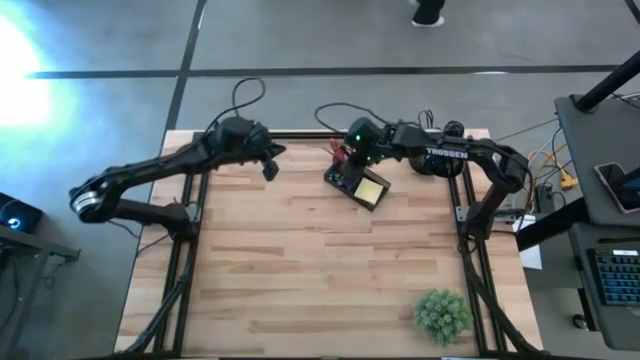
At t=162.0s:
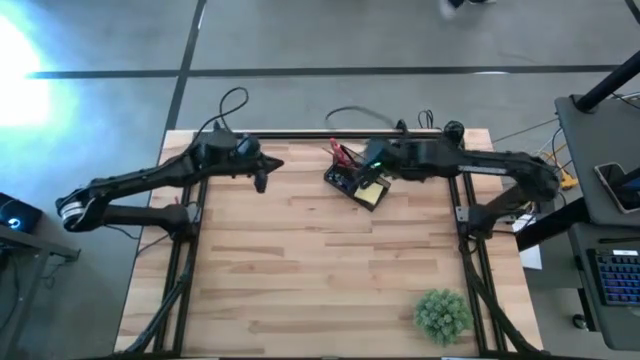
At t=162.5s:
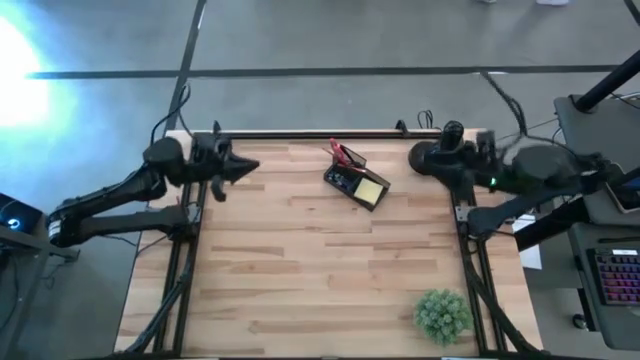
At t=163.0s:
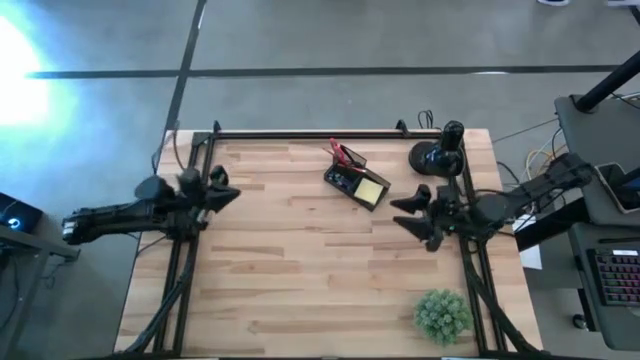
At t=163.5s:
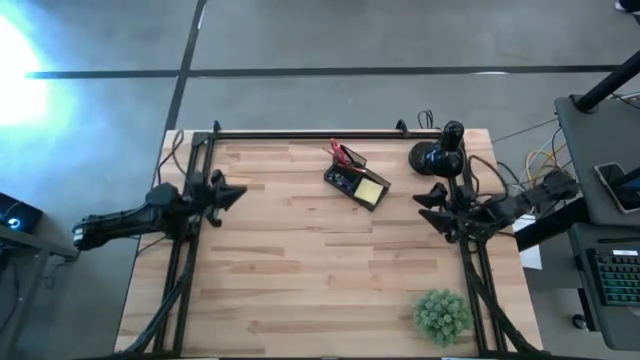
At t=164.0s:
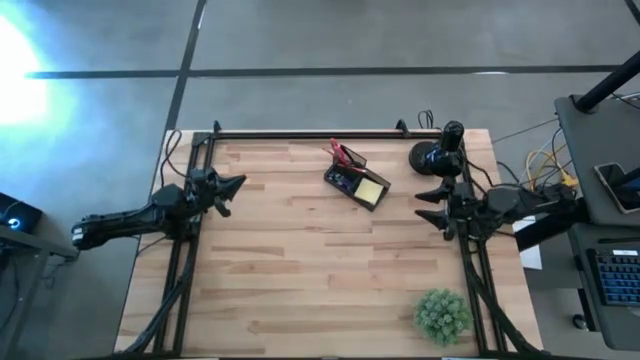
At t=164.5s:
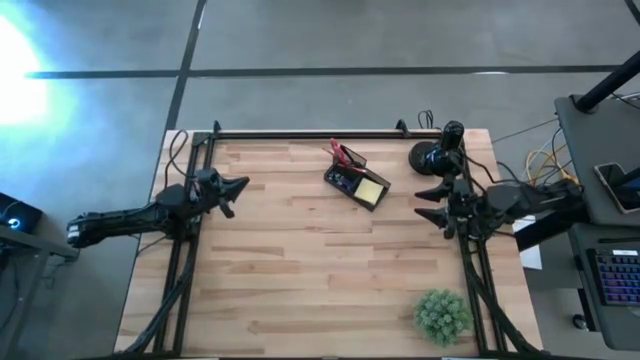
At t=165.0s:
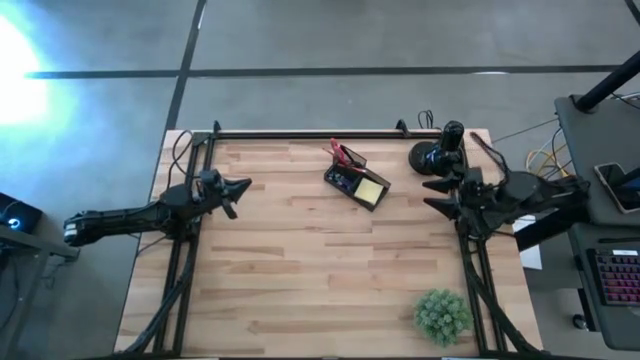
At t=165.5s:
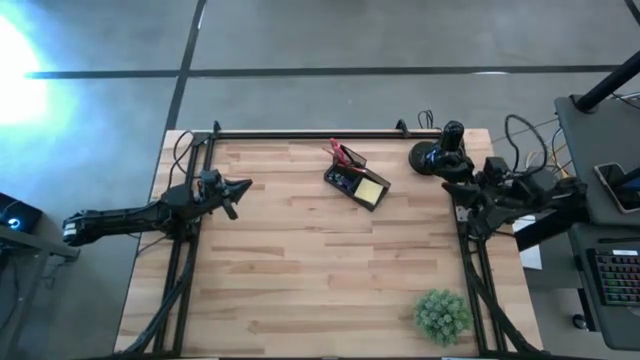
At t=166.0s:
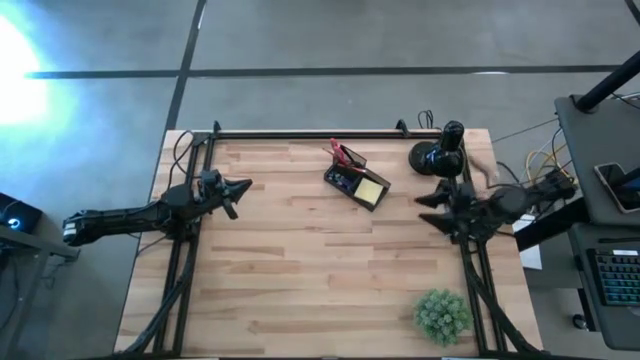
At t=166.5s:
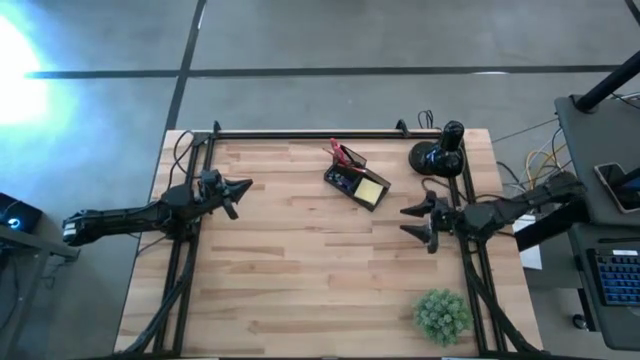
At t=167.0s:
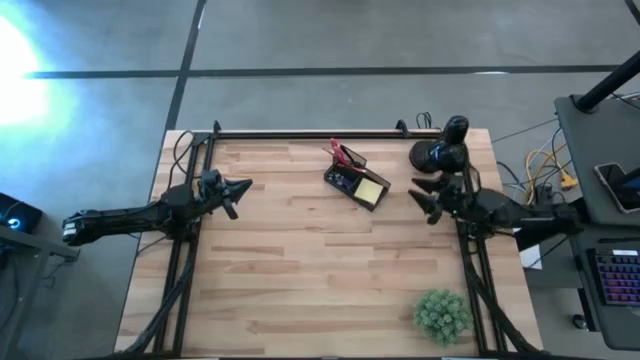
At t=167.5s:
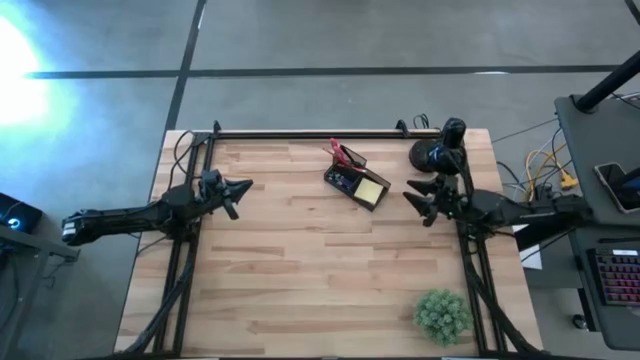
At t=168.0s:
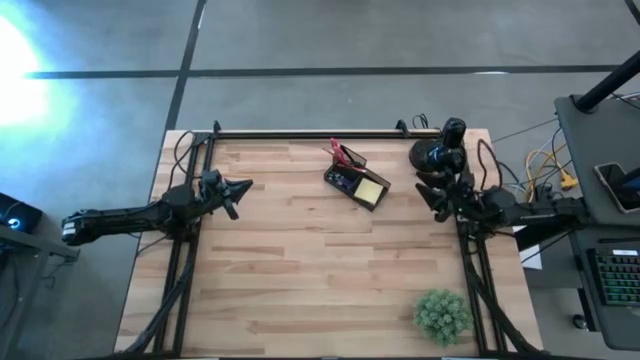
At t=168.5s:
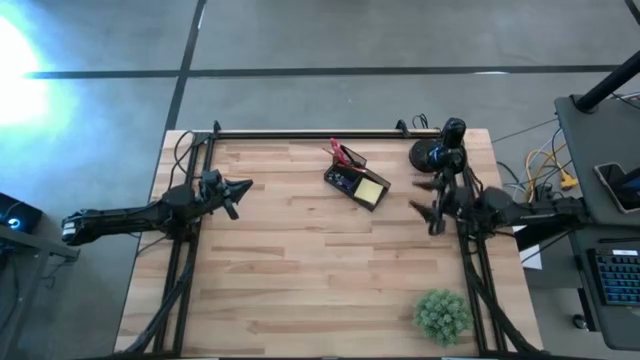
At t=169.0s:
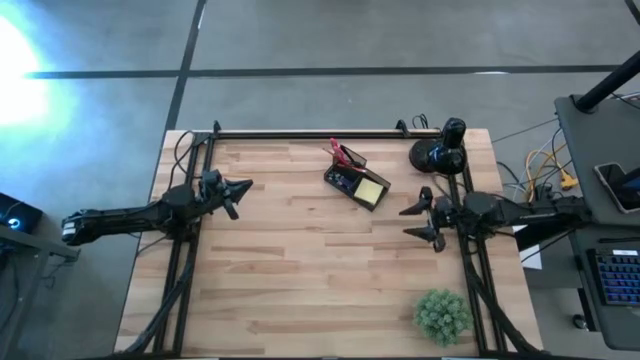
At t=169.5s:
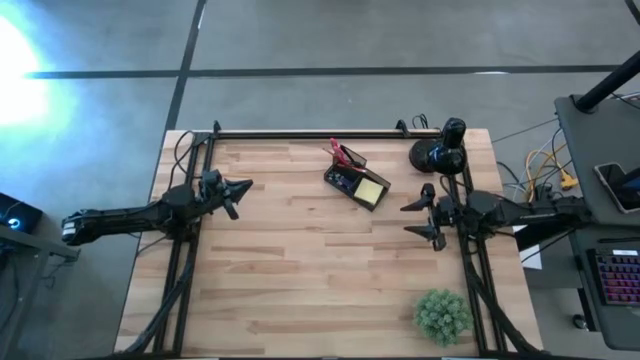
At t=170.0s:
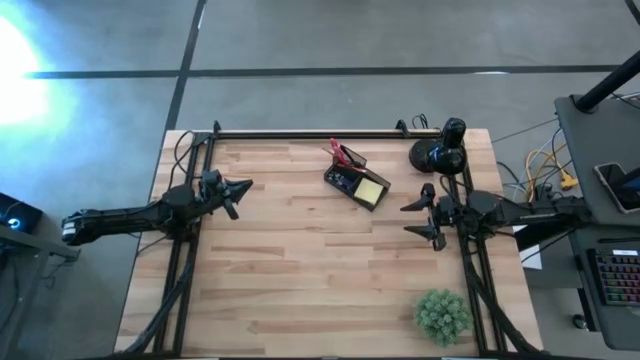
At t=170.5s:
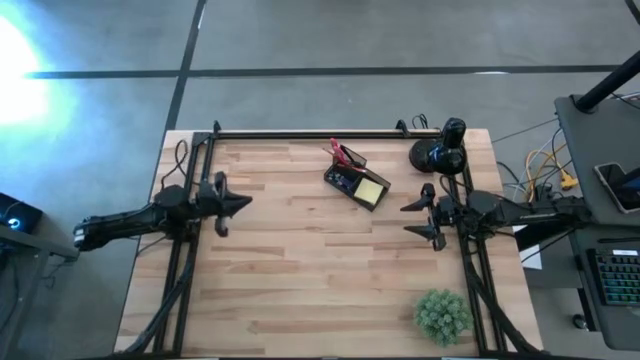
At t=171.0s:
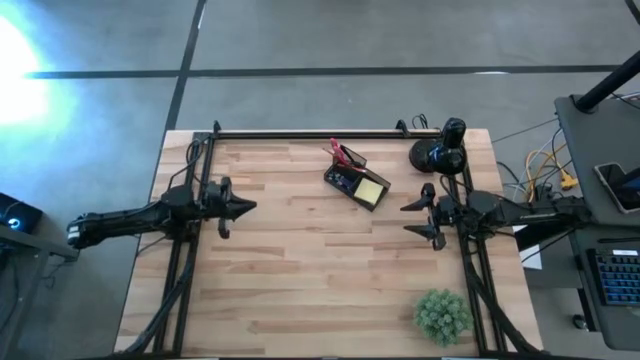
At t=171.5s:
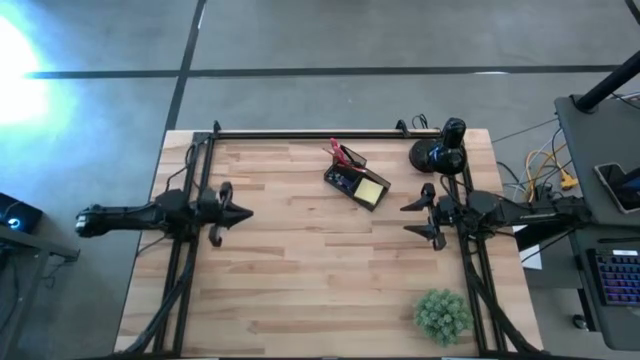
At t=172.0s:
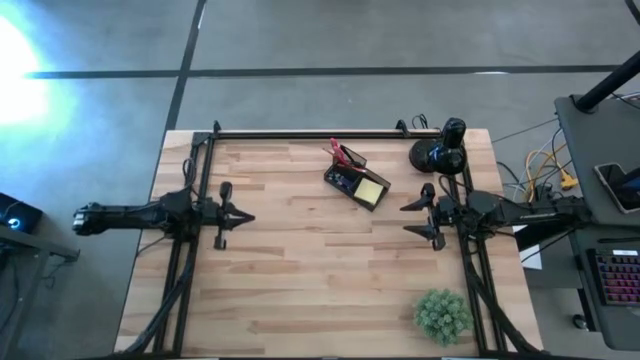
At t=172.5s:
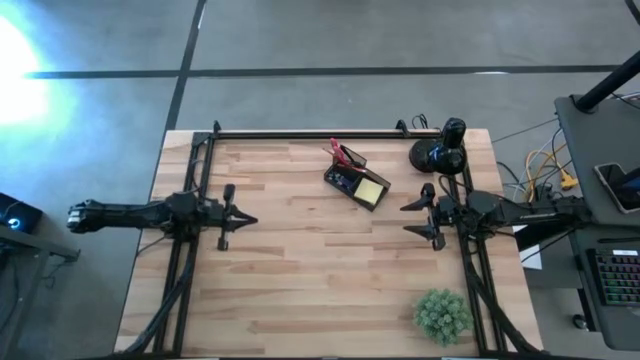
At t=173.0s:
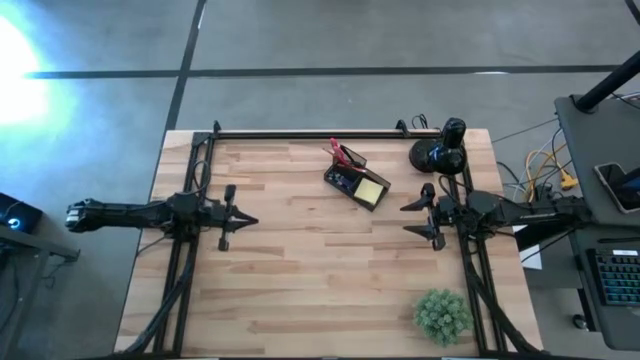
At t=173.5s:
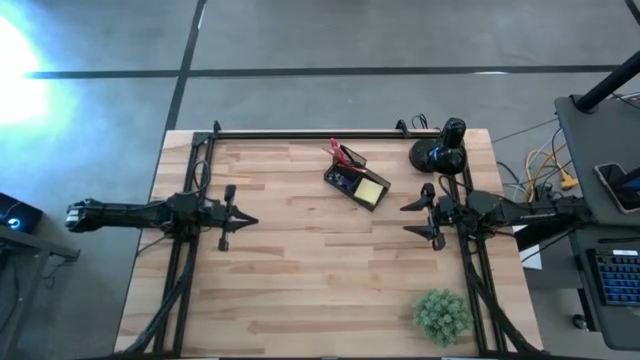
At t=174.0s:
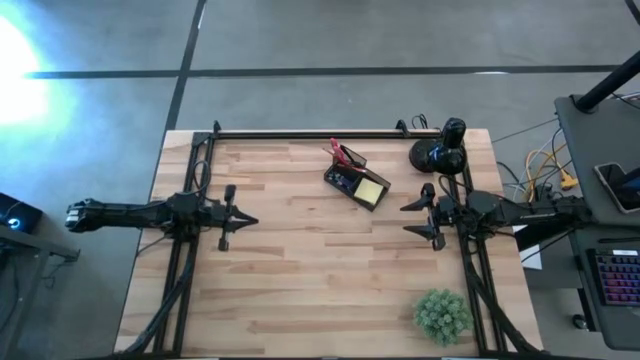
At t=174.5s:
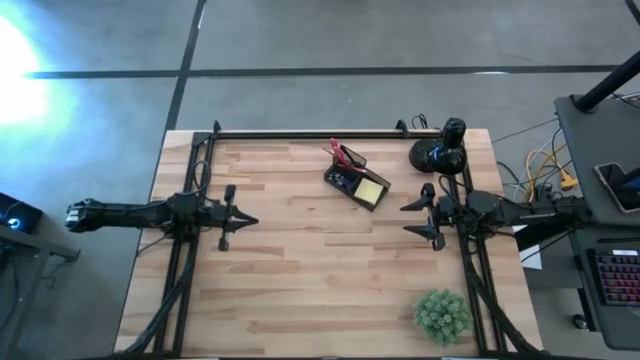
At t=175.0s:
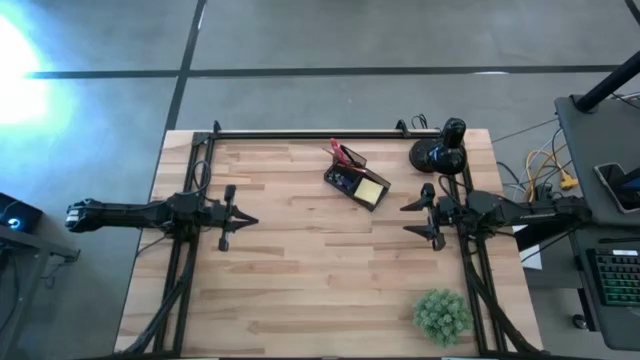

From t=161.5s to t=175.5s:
Task: Pick and place office supplies into organizer
Return to Home Position

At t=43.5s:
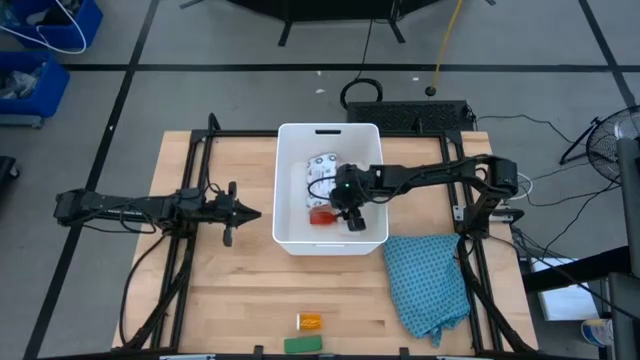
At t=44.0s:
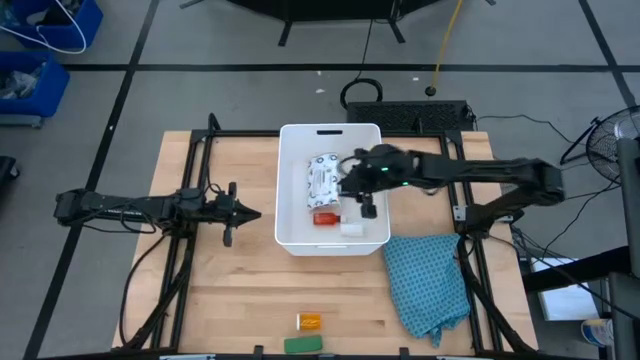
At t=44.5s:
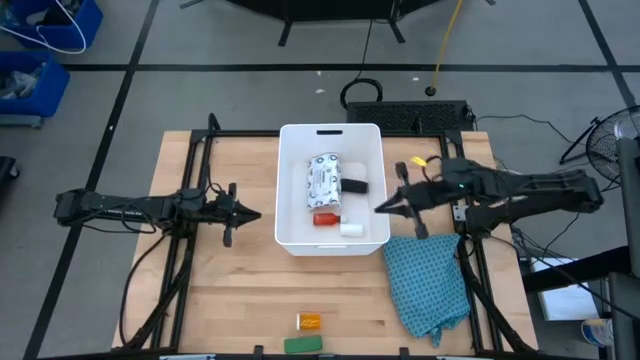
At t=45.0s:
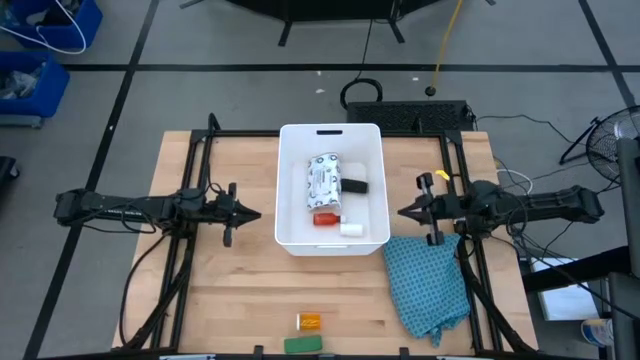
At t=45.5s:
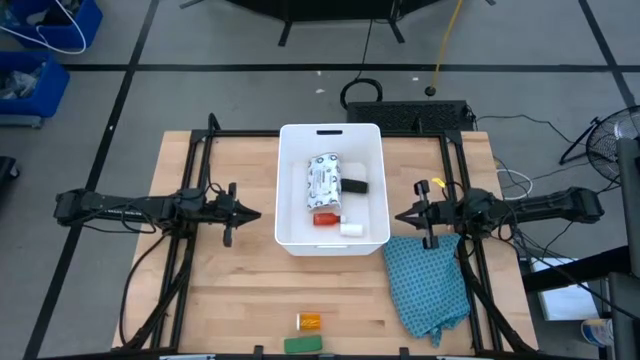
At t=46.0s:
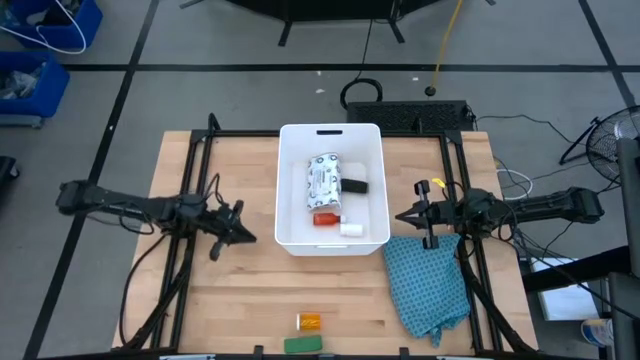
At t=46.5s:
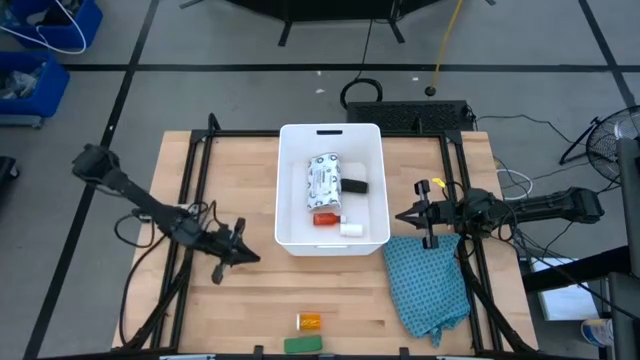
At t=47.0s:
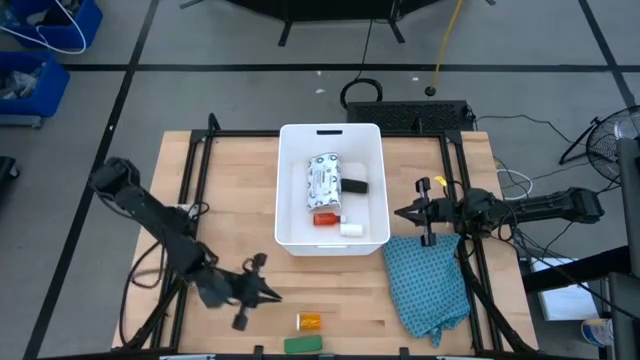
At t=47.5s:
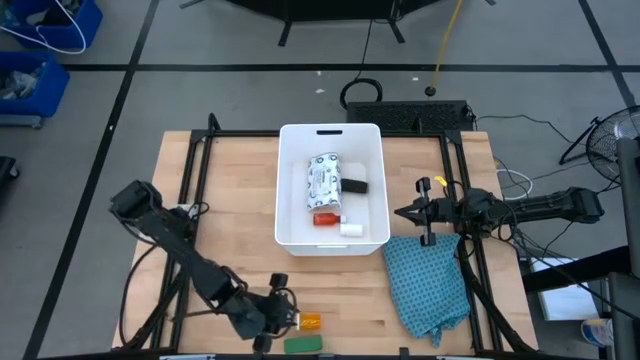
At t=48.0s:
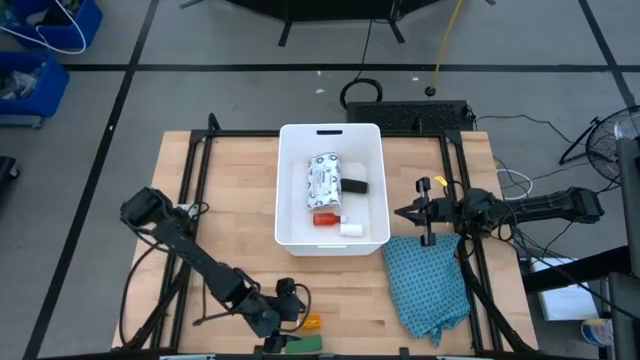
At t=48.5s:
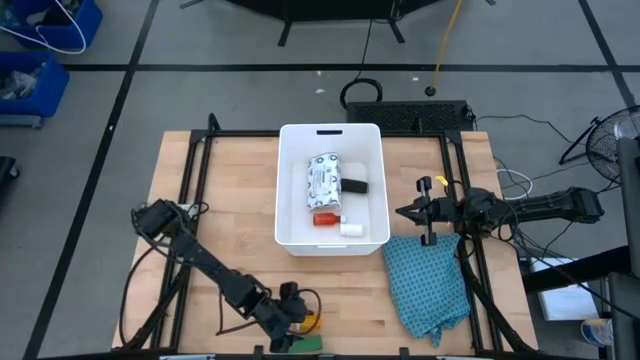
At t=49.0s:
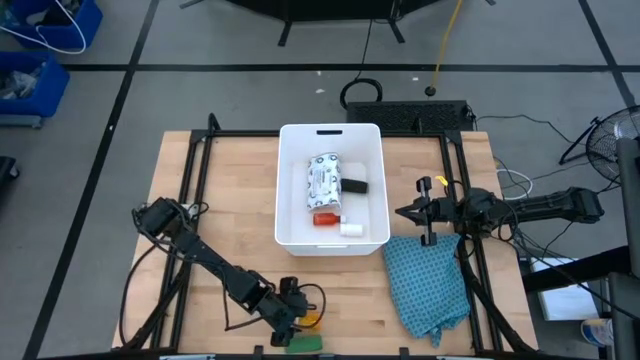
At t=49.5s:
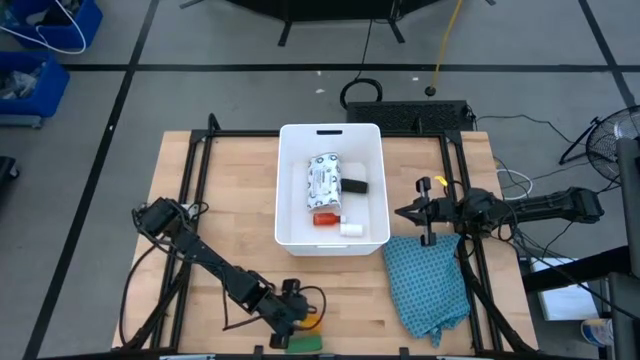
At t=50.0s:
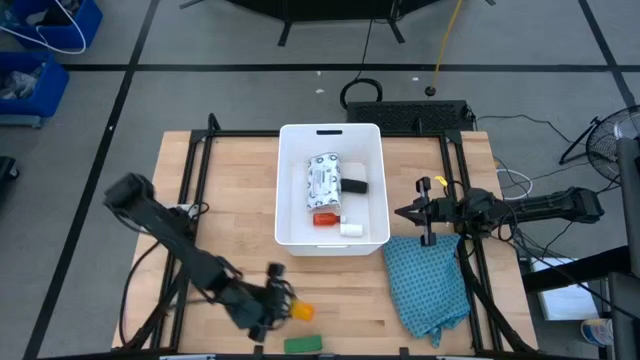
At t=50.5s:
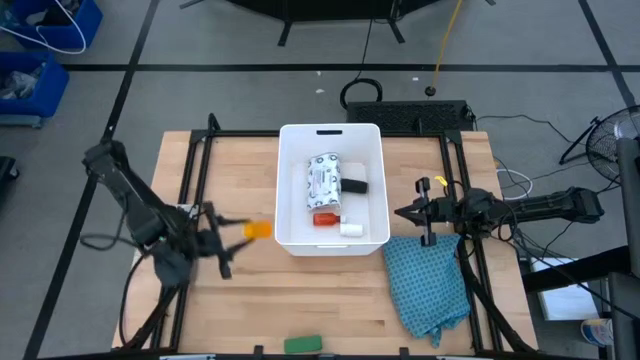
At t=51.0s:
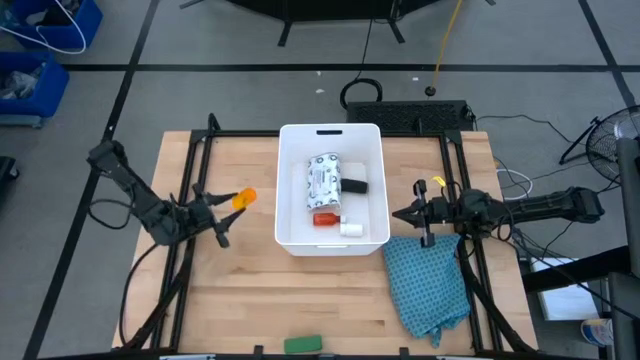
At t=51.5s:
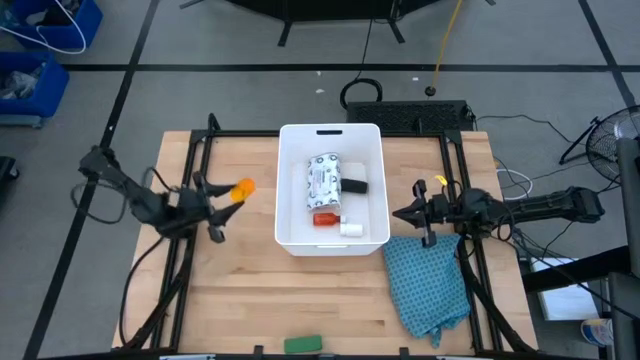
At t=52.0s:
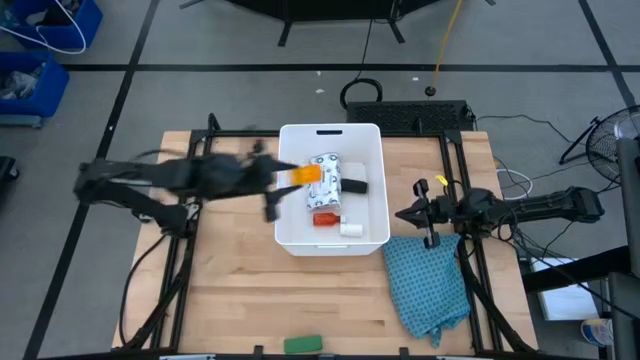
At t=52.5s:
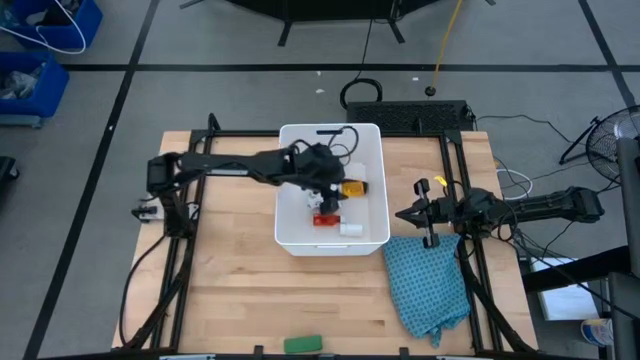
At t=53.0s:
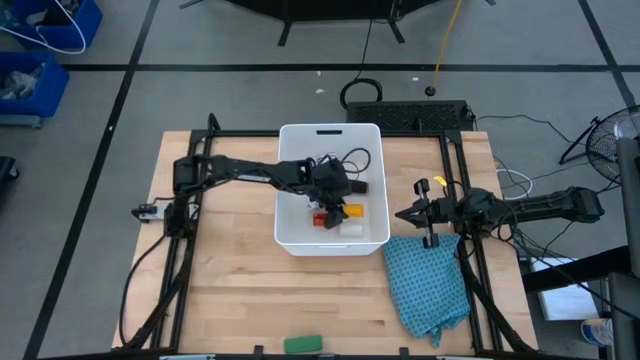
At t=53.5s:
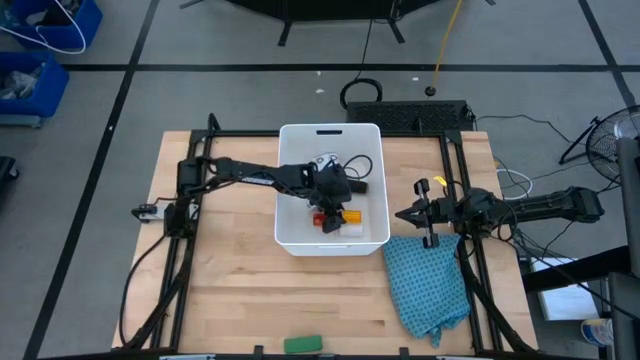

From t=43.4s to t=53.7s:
Task: Pick & place medical supplies in basket/bin
Put the orange pill bottle into the white bin
